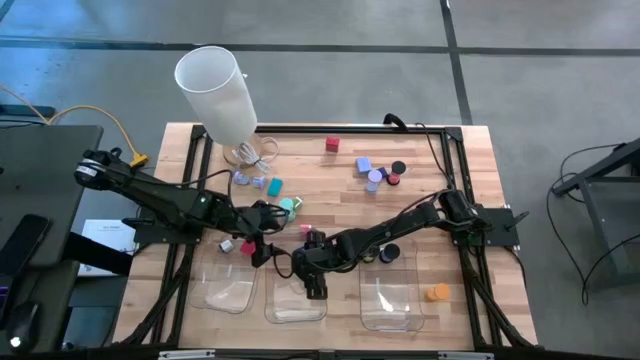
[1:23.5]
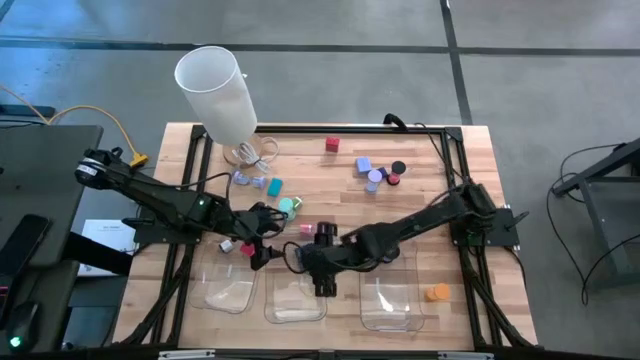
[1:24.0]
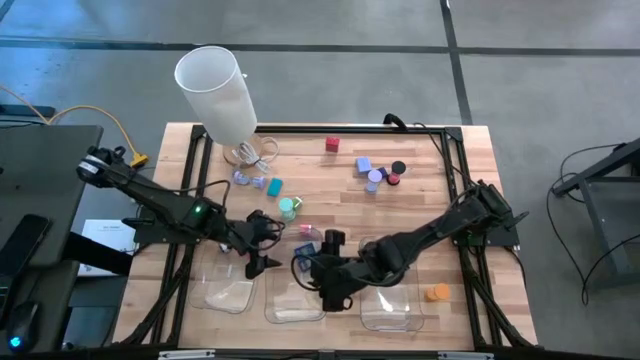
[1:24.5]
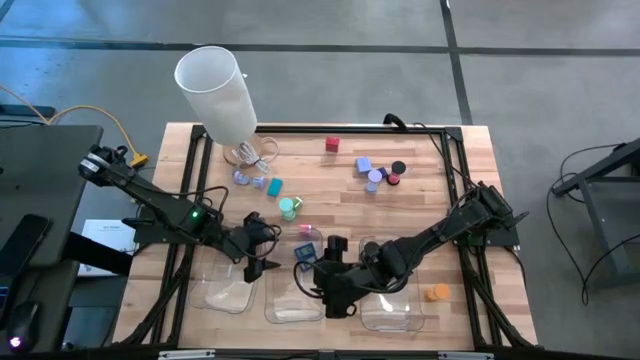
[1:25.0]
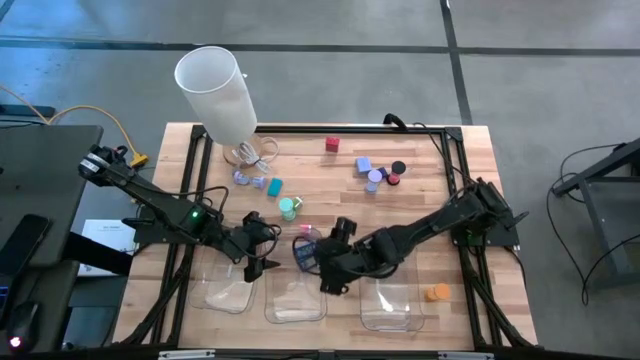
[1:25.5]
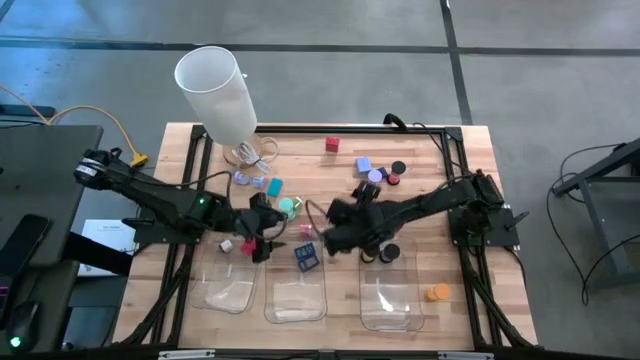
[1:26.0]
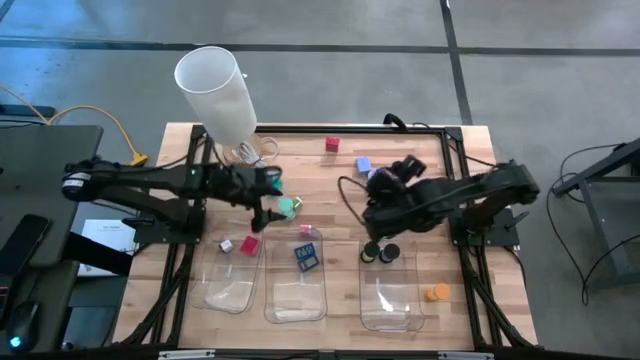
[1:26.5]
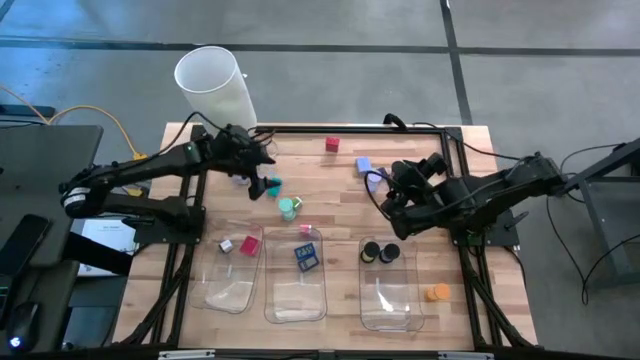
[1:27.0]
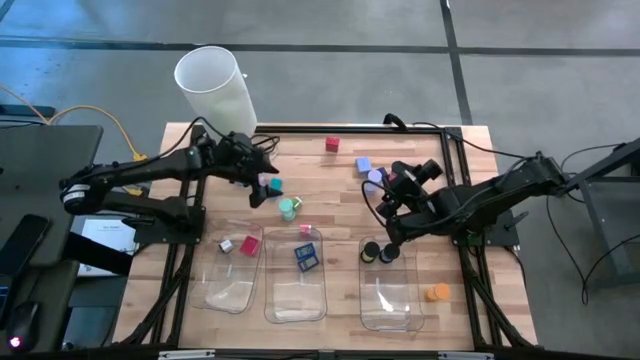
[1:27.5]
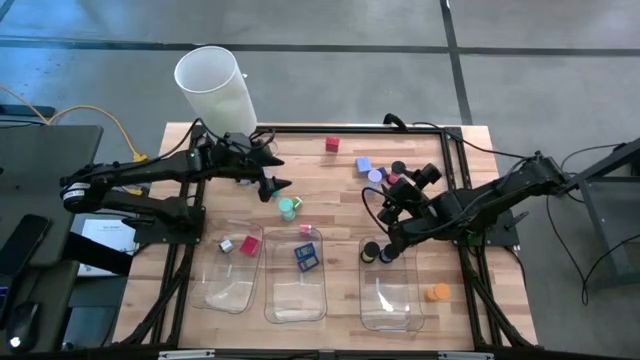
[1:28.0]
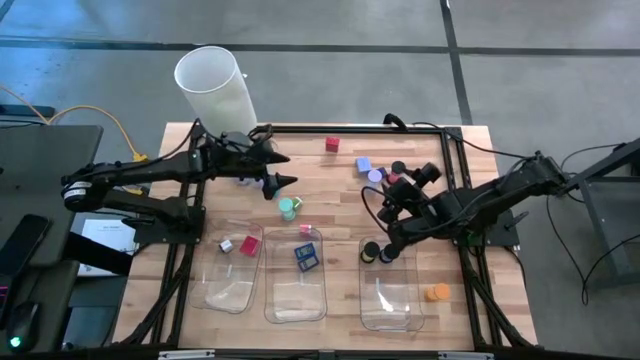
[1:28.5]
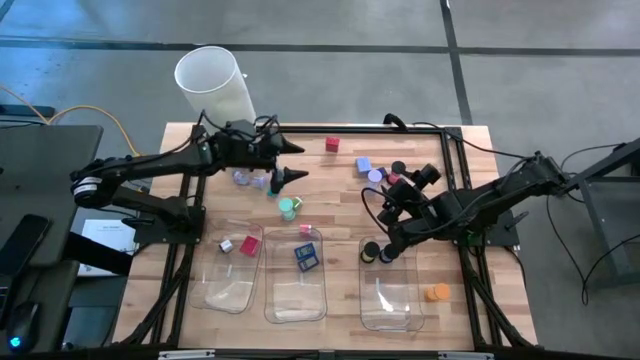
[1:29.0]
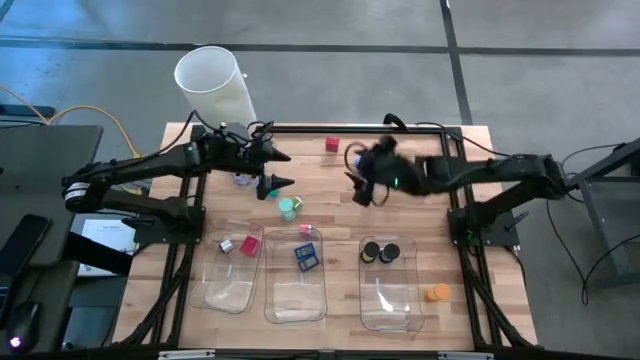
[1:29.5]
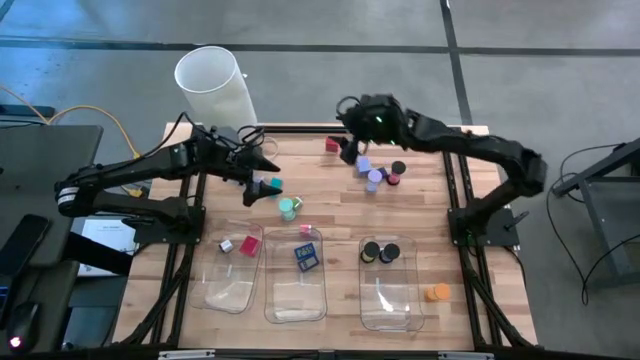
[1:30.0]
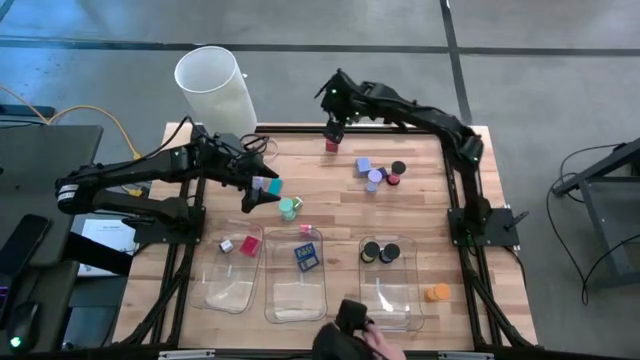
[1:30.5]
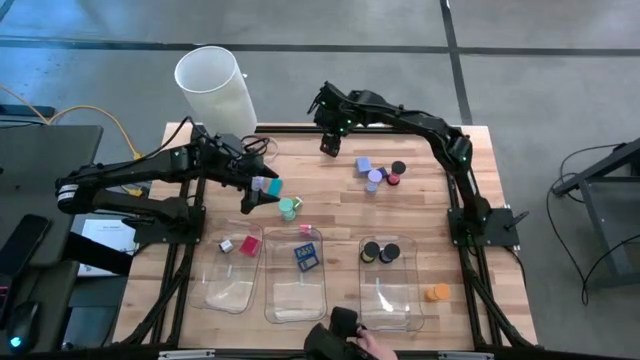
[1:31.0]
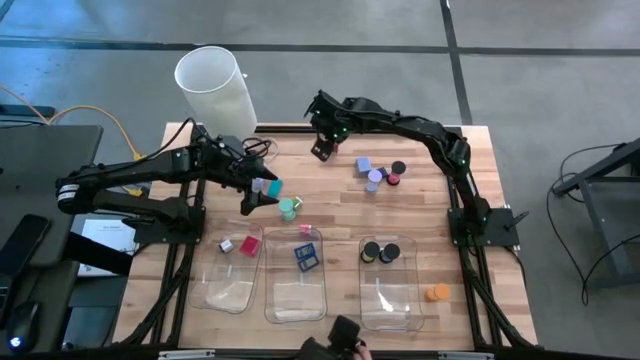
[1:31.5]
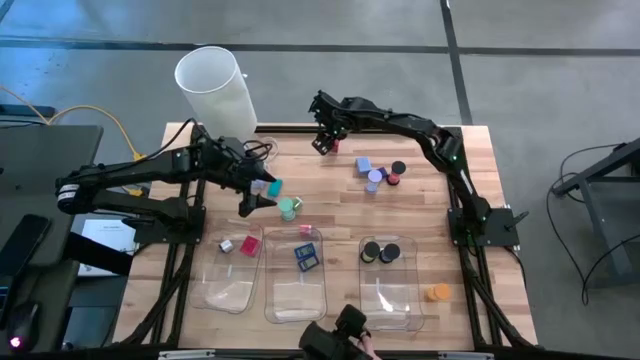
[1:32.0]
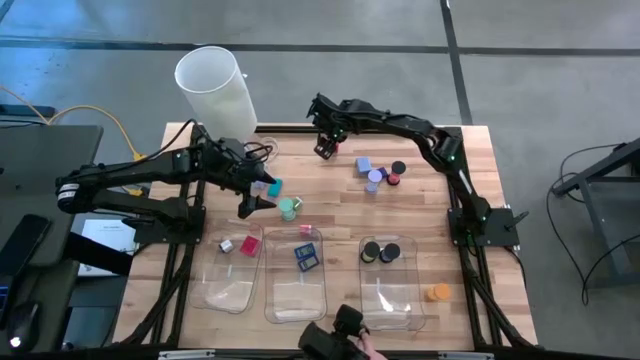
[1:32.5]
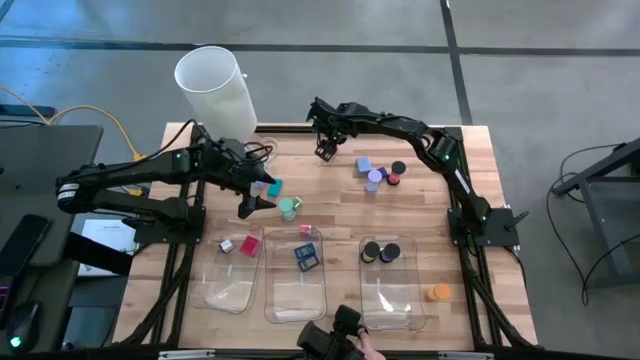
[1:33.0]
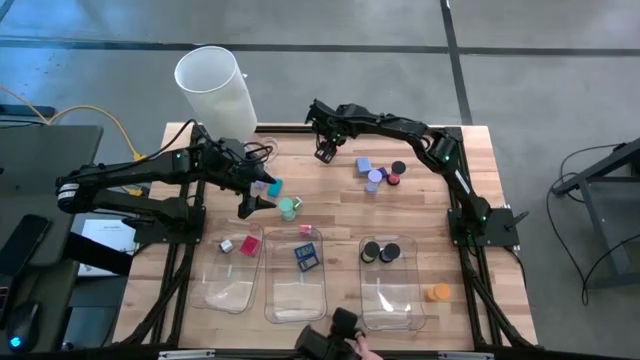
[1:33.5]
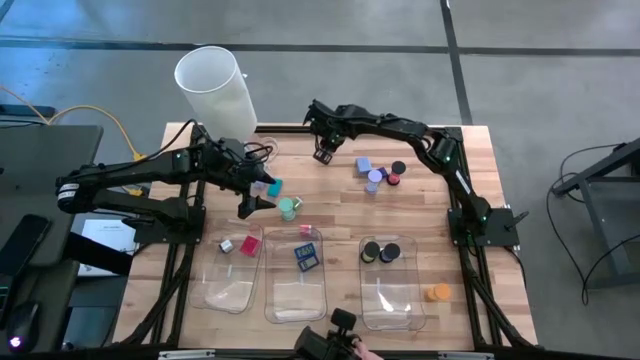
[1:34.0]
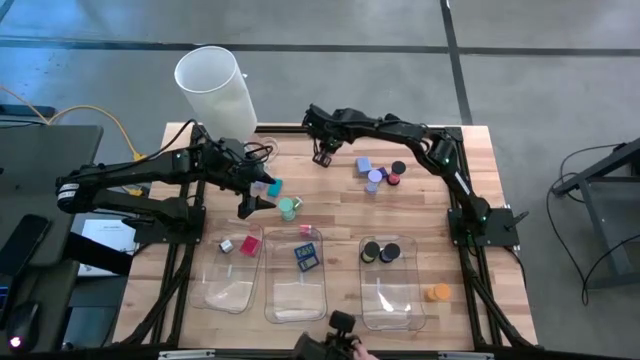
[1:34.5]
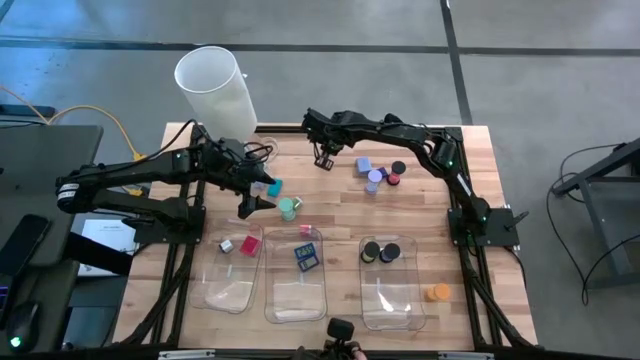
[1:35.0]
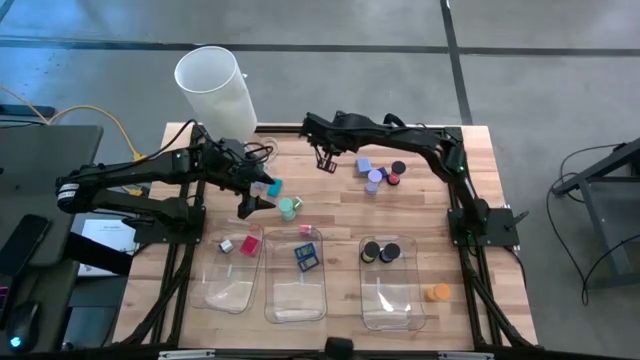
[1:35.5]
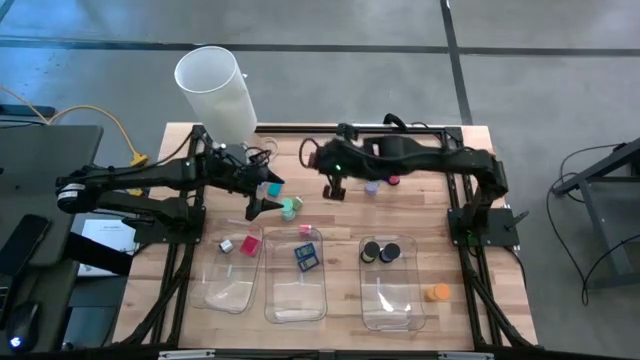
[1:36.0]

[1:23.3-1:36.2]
Task: Pick & Place Office items
Put the top middle red adapter into the left bin

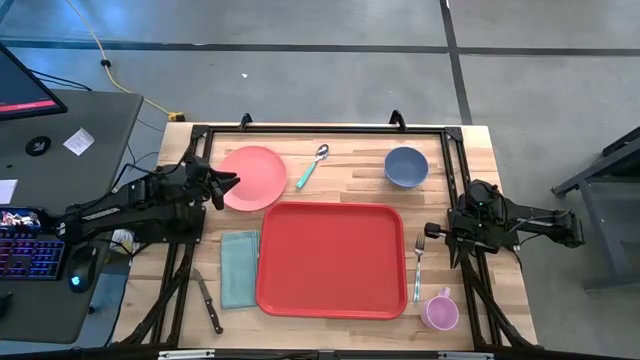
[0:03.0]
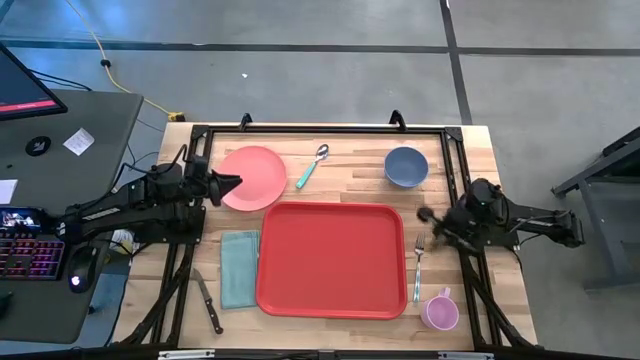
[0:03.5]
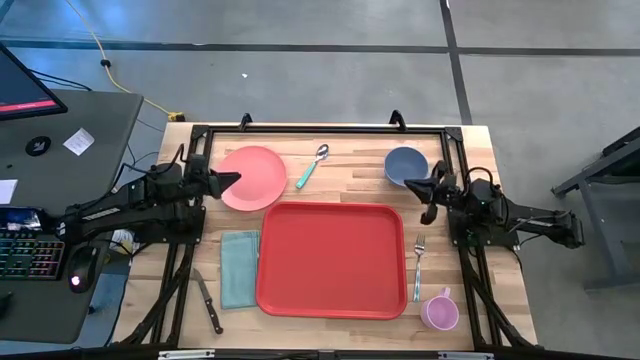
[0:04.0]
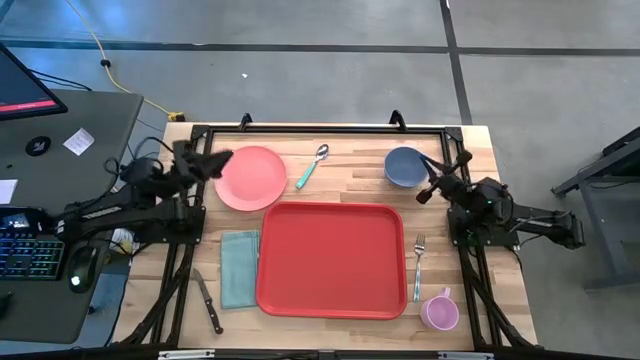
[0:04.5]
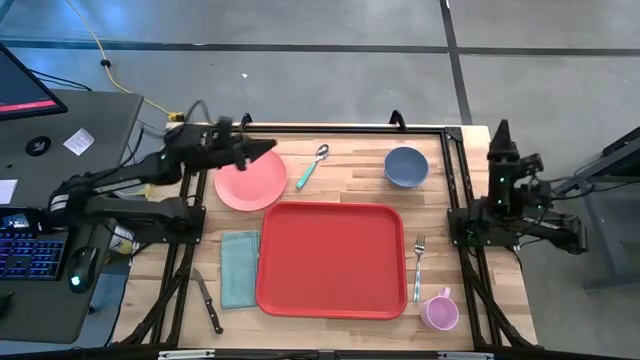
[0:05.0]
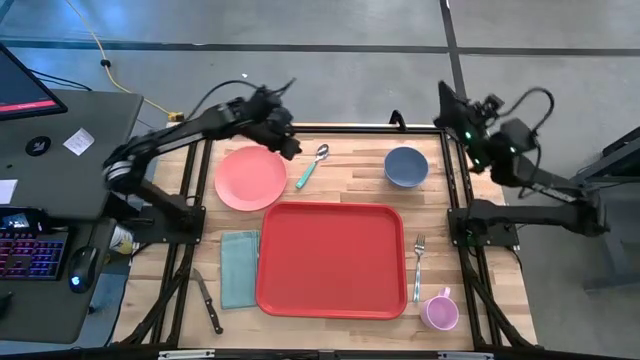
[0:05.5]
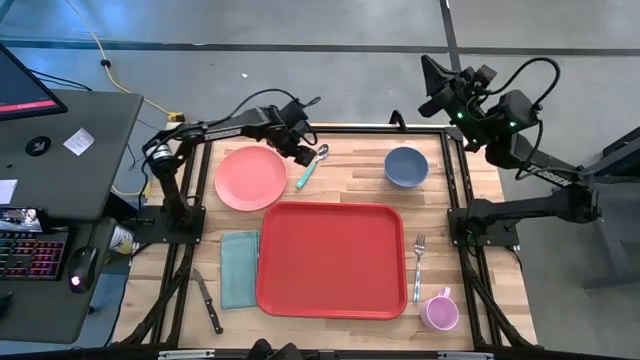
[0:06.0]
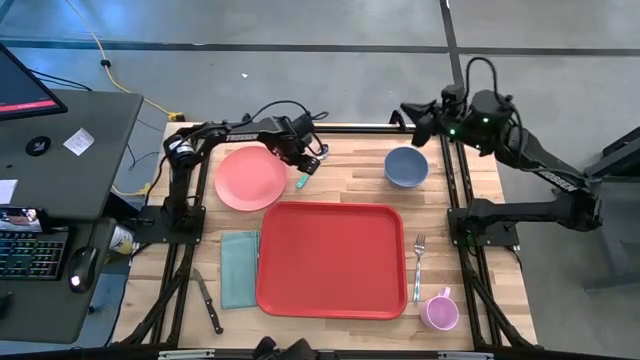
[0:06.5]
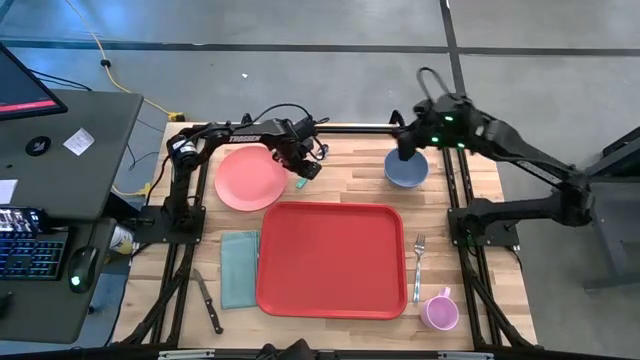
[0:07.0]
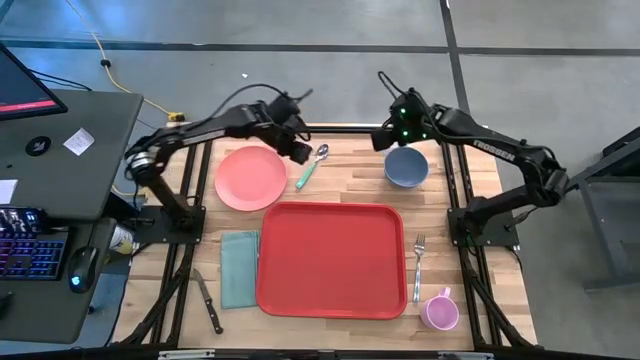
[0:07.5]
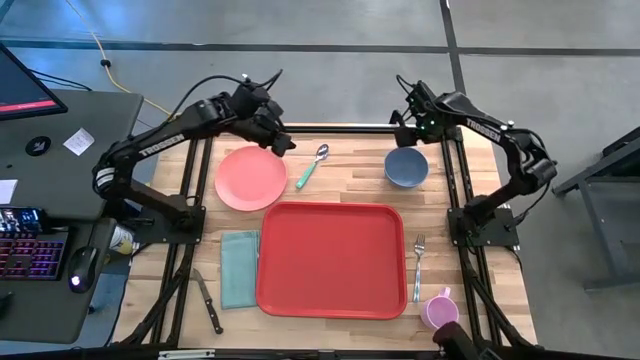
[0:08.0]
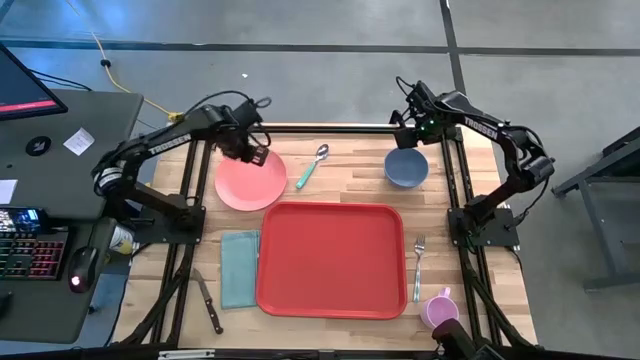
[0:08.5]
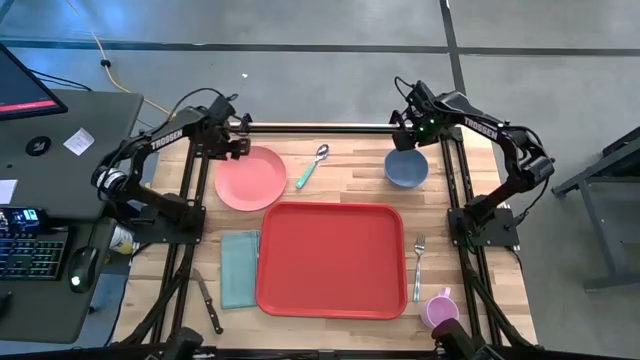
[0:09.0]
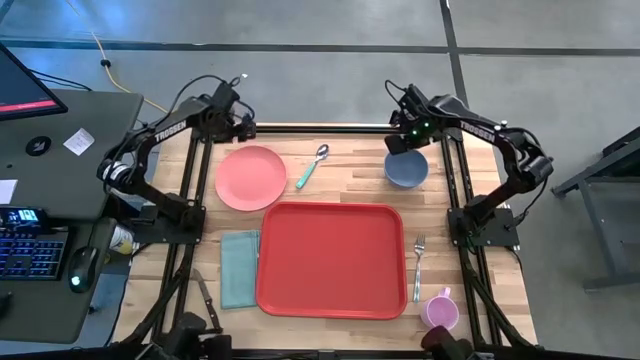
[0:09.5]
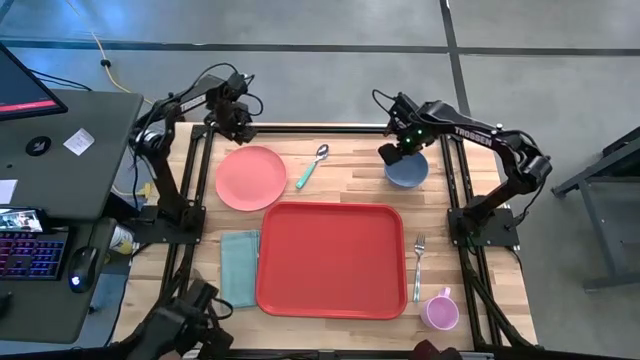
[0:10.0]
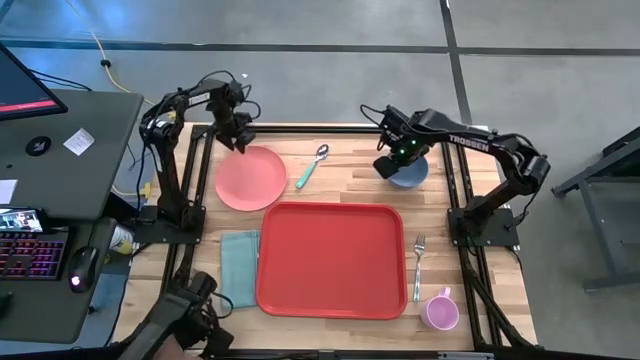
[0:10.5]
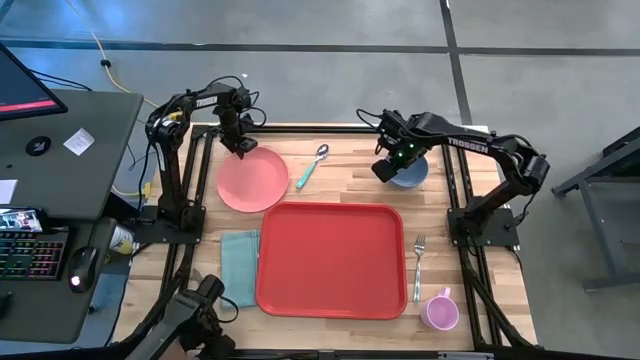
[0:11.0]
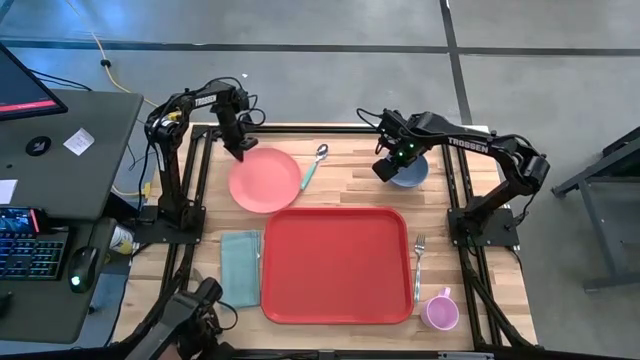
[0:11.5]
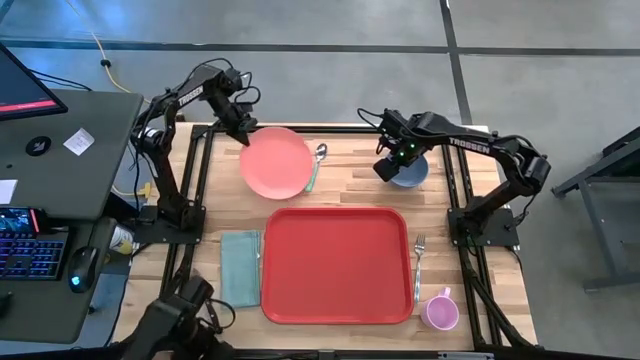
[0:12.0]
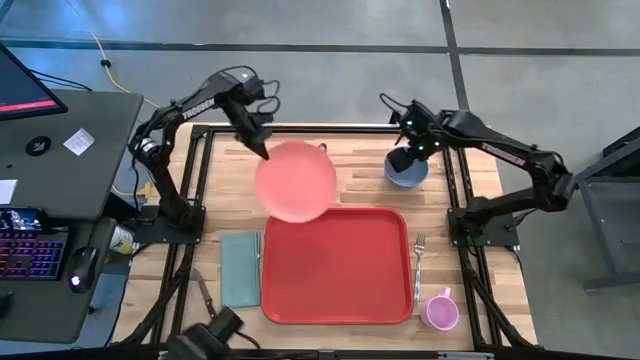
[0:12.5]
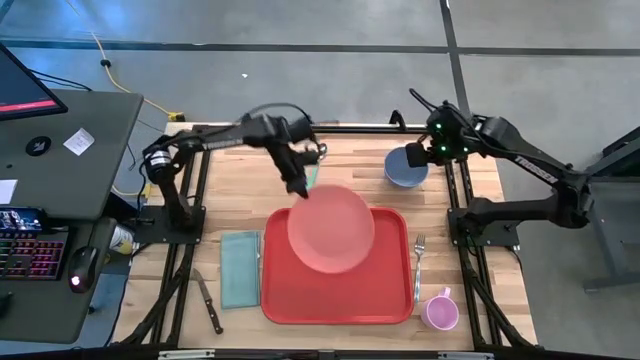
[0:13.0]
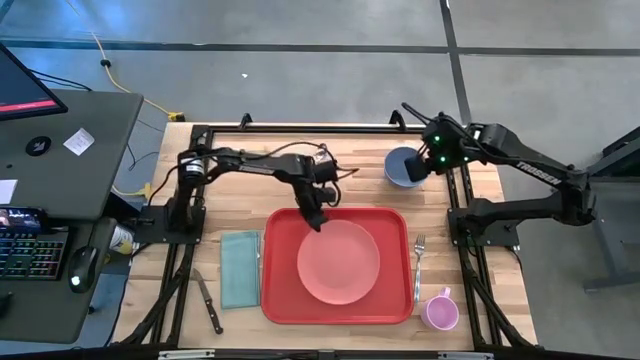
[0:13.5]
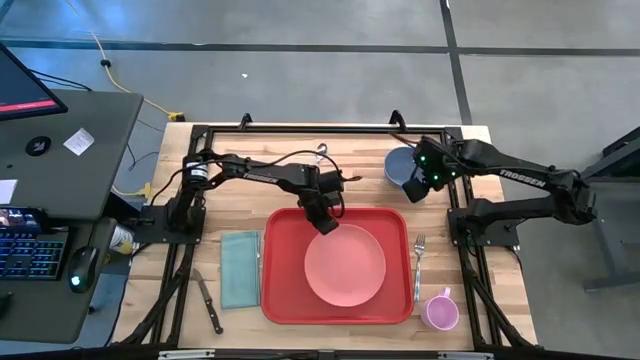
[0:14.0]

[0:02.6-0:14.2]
Task: Set up tray
Put the pink plate on the red tray
